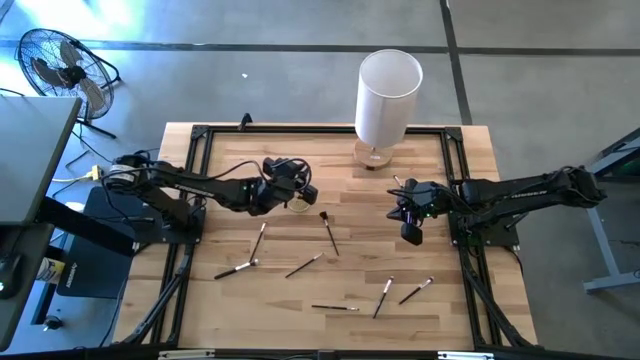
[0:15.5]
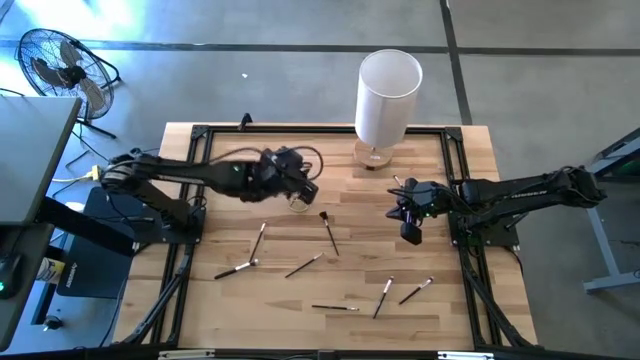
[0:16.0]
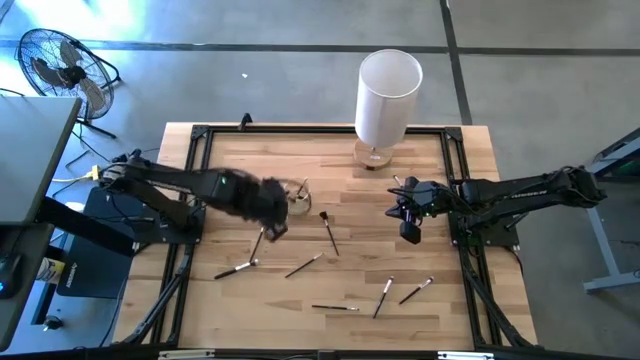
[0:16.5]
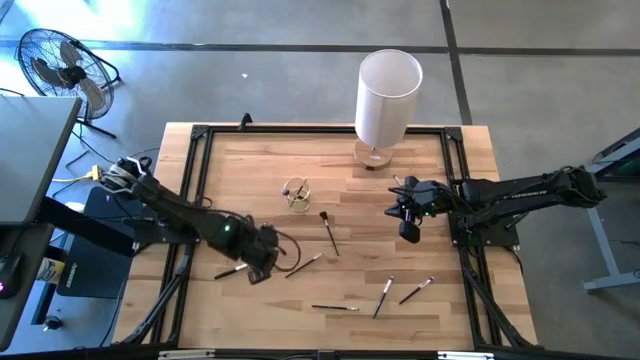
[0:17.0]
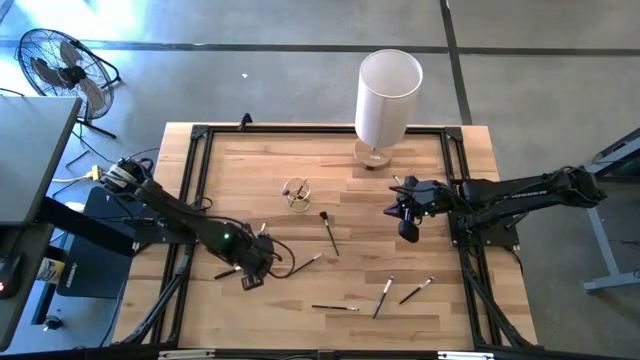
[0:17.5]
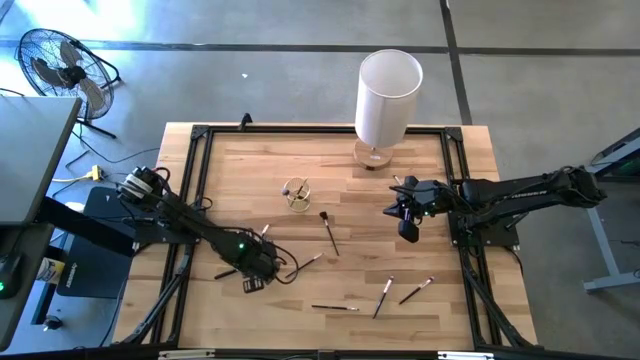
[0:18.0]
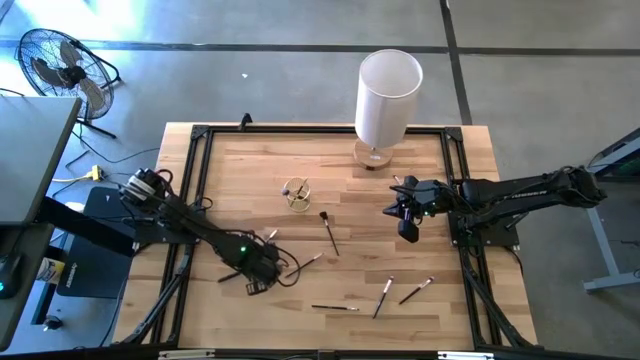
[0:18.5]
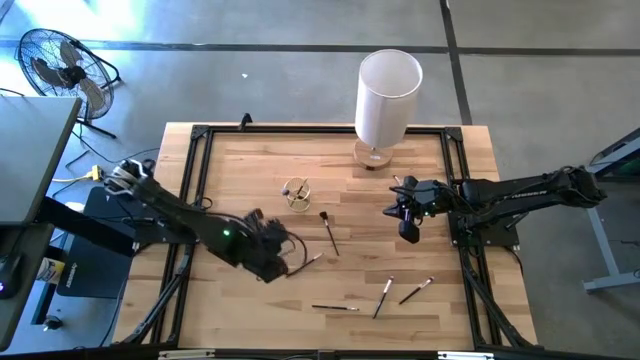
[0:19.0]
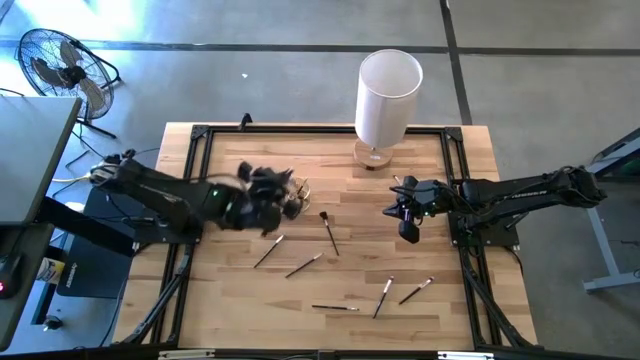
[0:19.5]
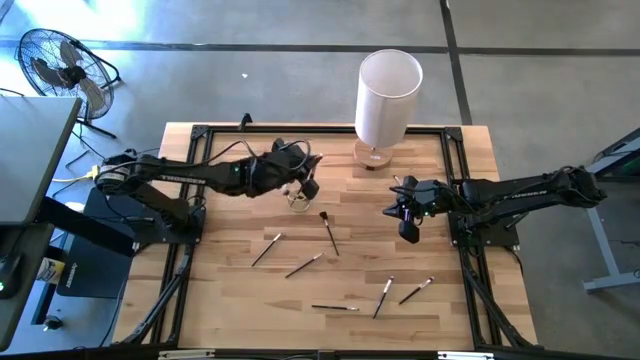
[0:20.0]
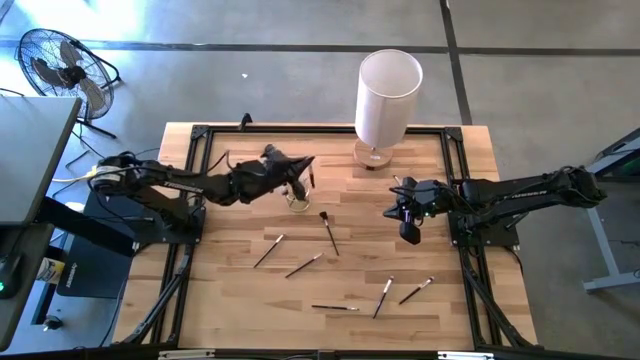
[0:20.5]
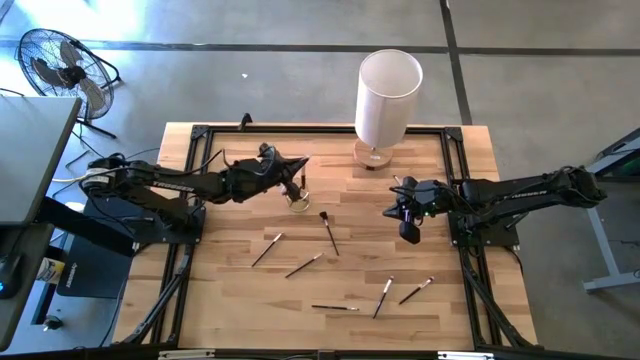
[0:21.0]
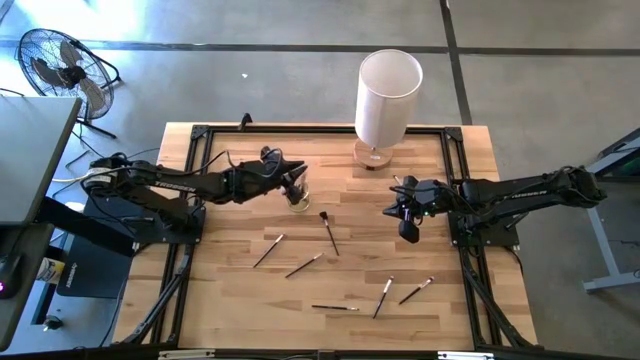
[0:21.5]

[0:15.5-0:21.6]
Task: Put items in baskets/containers
Put the black powder brush into the yellow holder

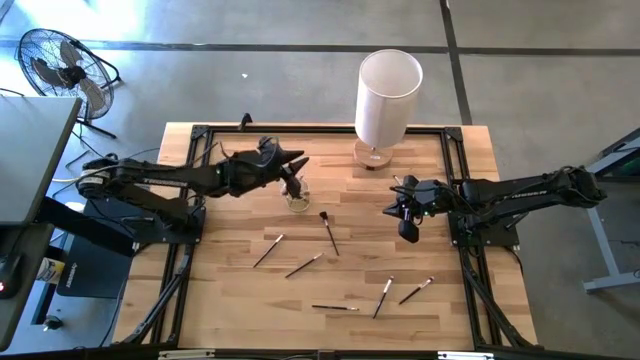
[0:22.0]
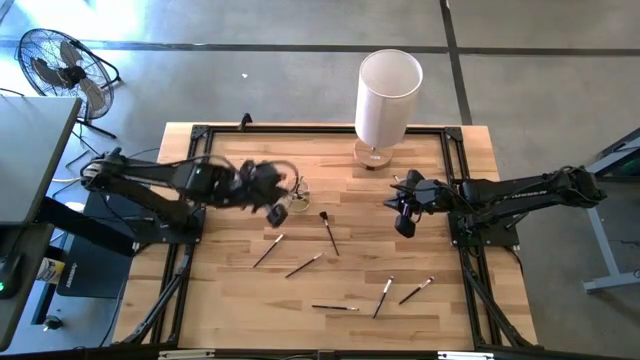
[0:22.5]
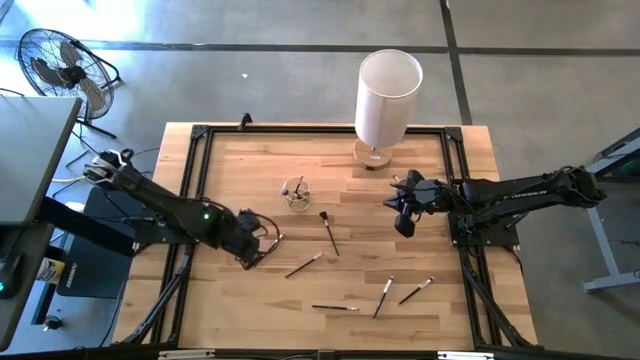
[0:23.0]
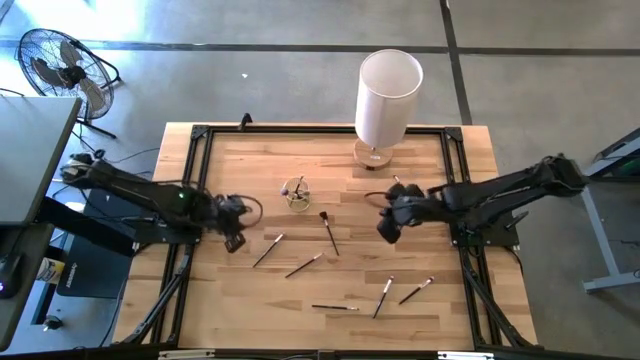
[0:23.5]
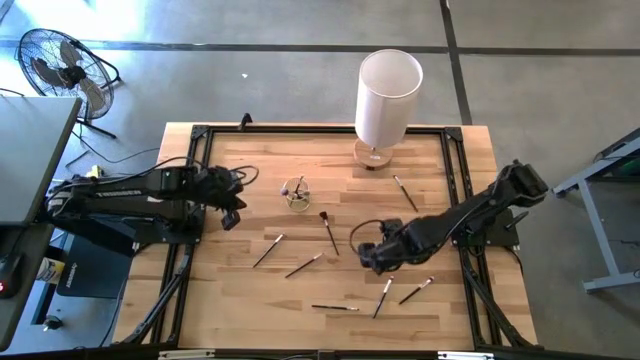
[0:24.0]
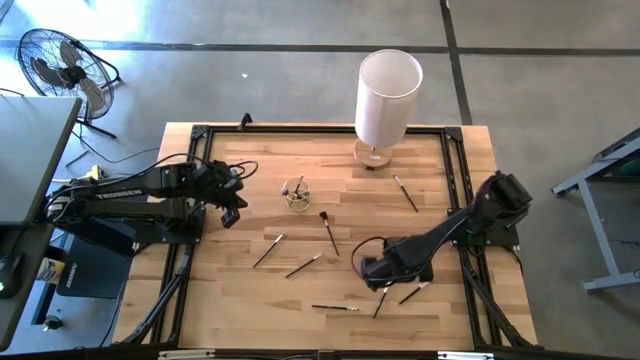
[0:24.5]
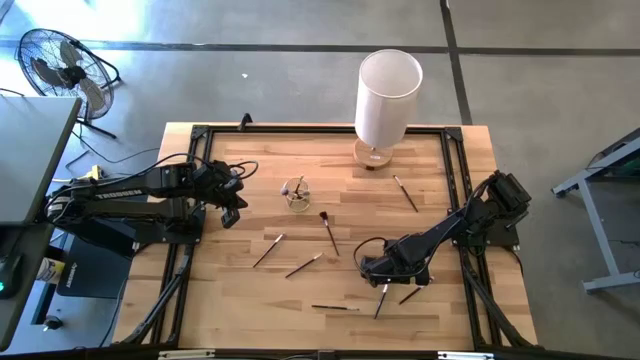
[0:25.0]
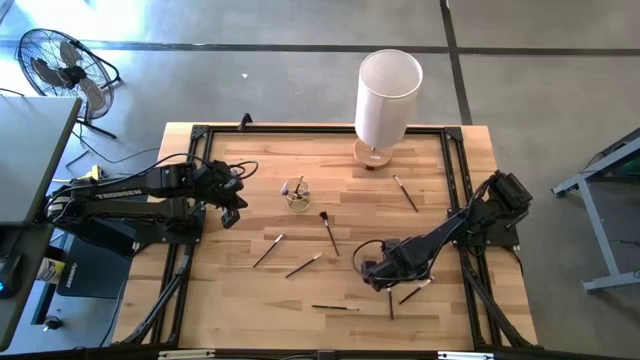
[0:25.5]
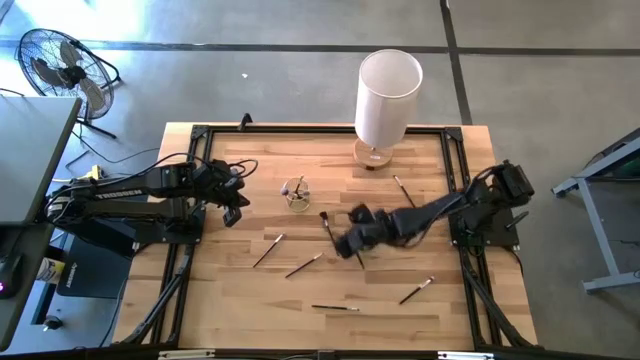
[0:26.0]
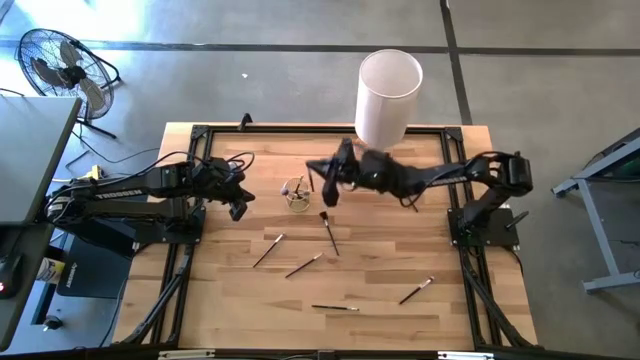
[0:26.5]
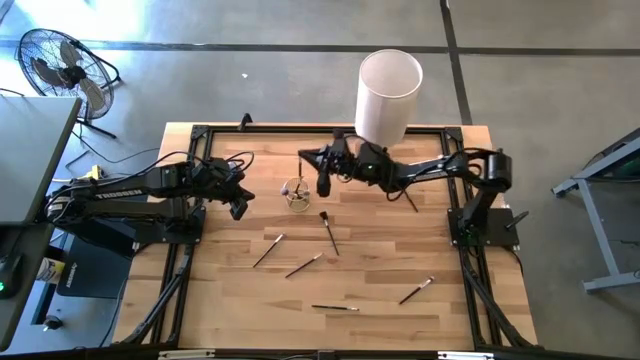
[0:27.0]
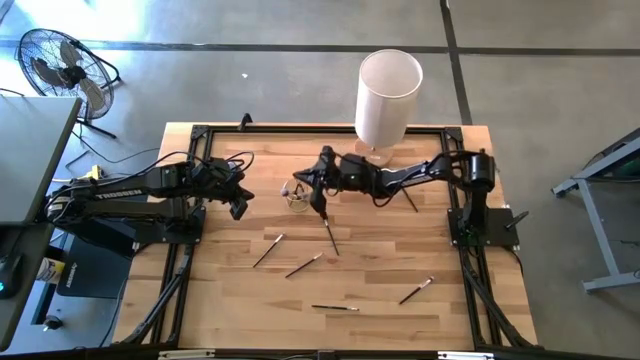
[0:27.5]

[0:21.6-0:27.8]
Put the black eyeshadow brush into the yellow holder

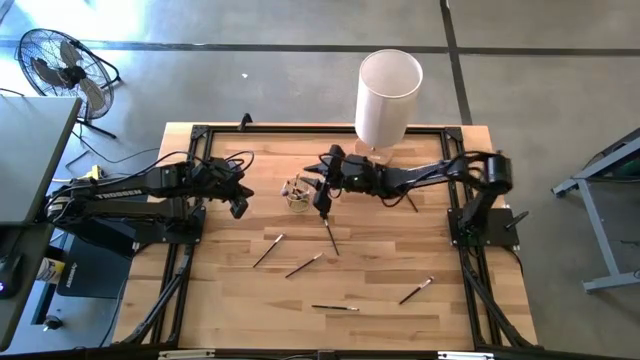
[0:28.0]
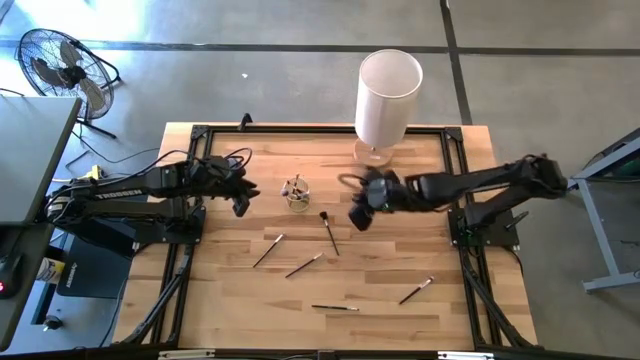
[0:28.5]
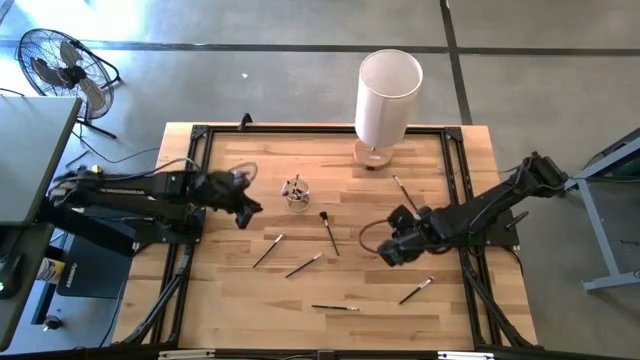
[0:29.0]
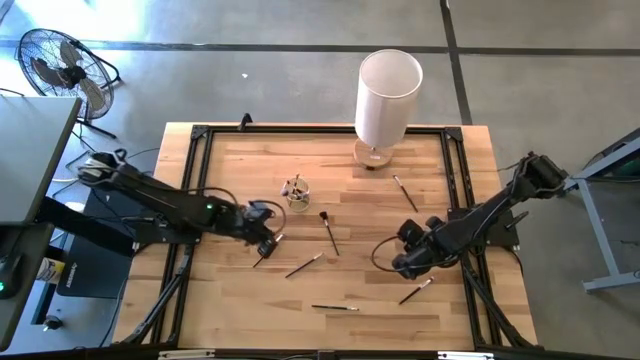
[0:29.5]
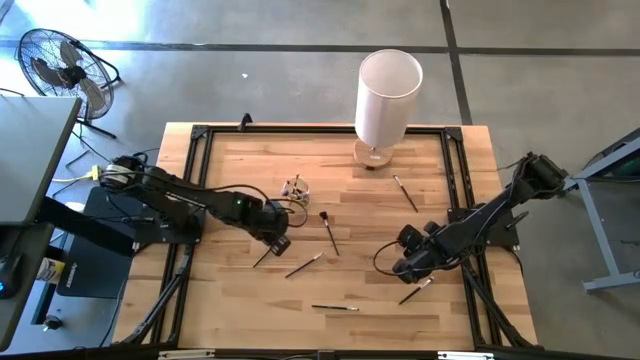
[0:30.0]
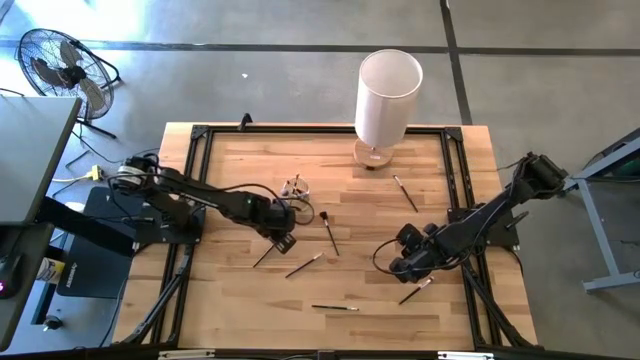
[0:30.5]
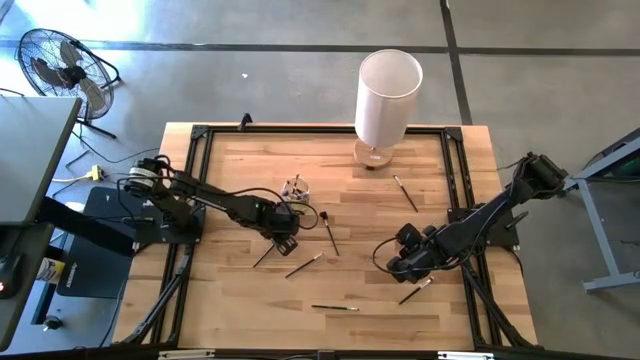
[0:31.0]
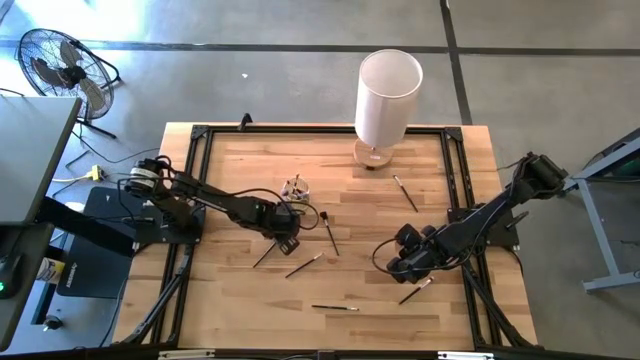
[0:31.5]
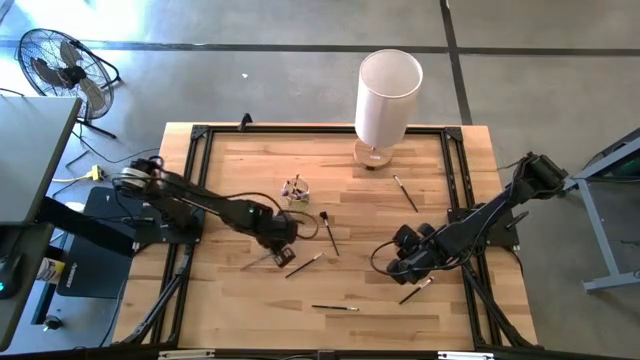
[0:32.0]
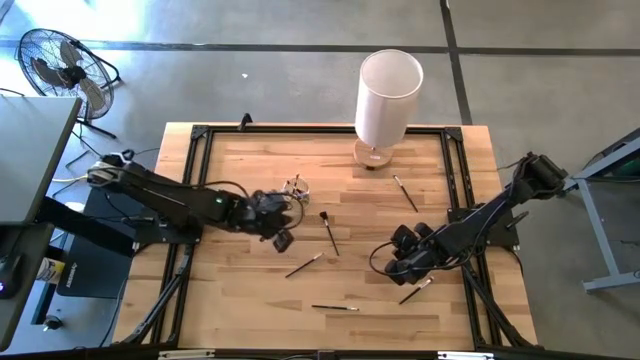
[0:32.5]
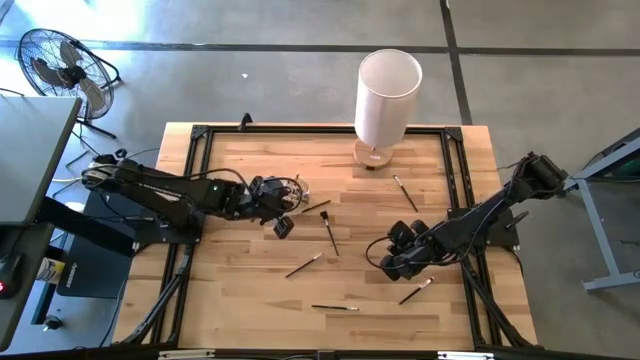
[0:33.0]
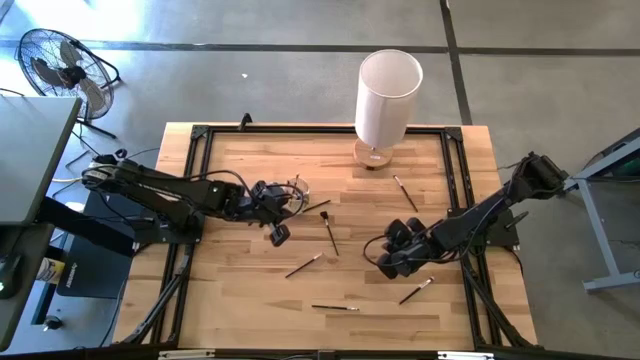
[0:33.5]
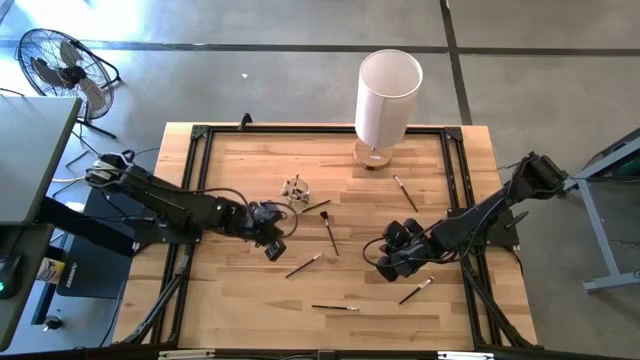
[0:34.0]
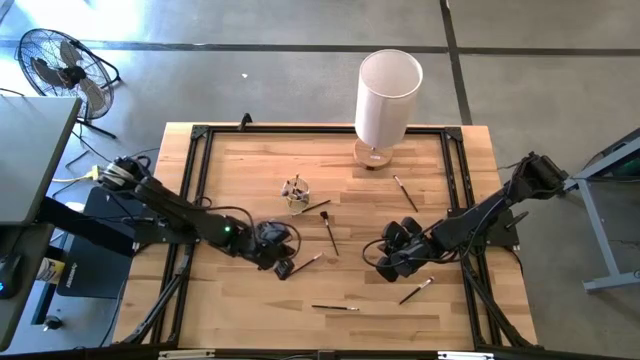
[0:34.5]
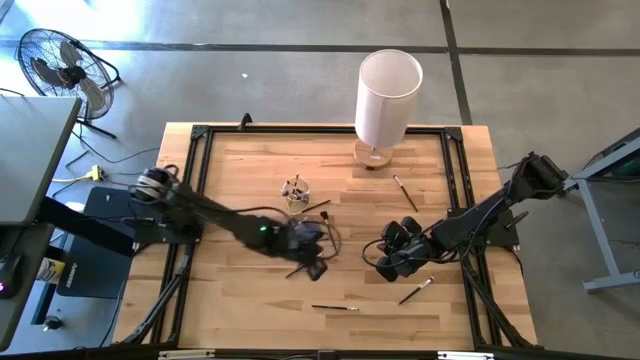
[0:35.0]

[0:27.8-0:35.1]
Put the black eyeshadow brush into the yellow holder

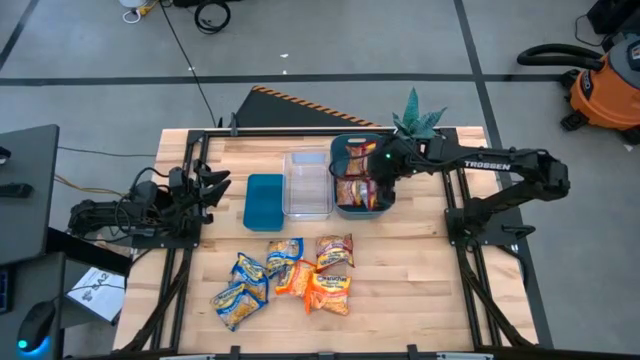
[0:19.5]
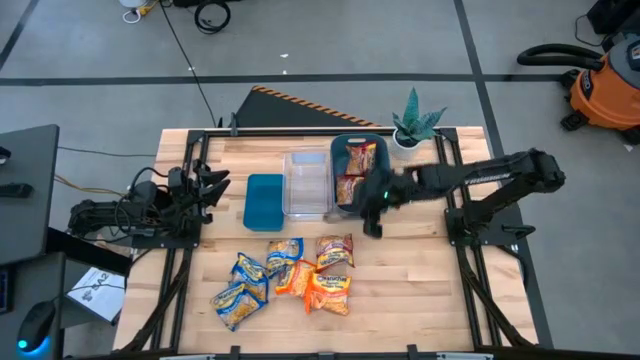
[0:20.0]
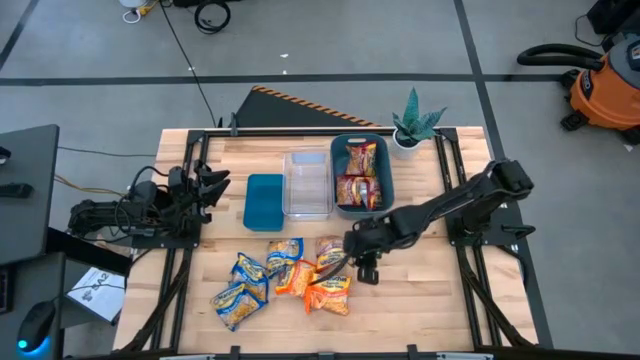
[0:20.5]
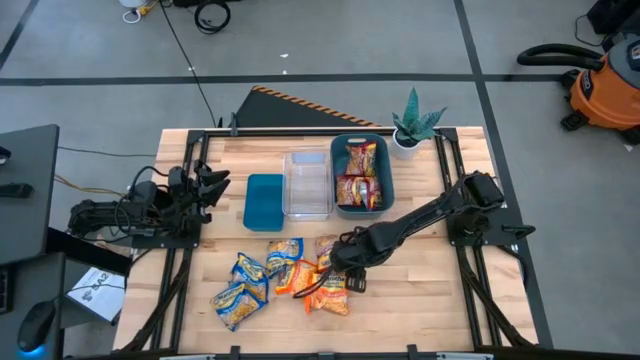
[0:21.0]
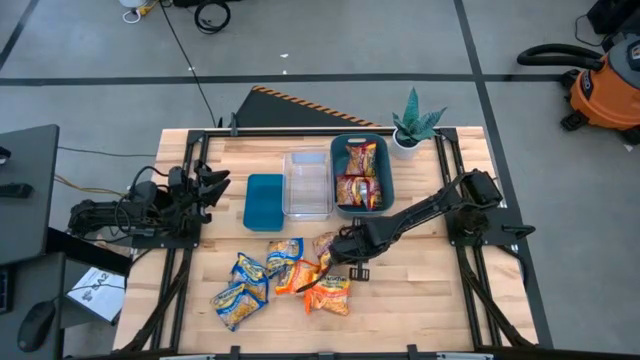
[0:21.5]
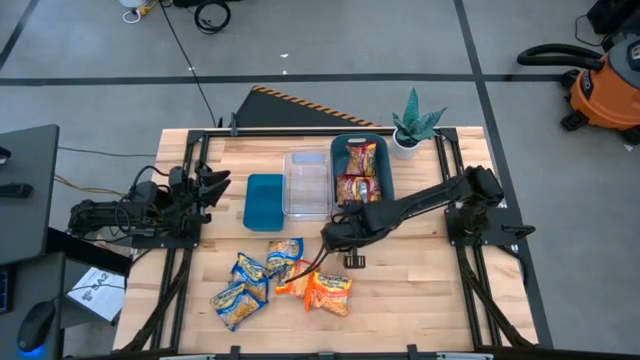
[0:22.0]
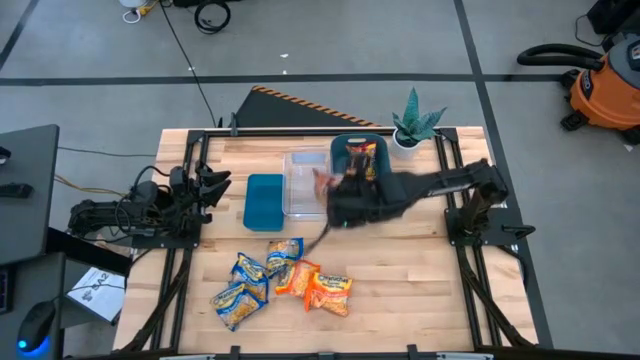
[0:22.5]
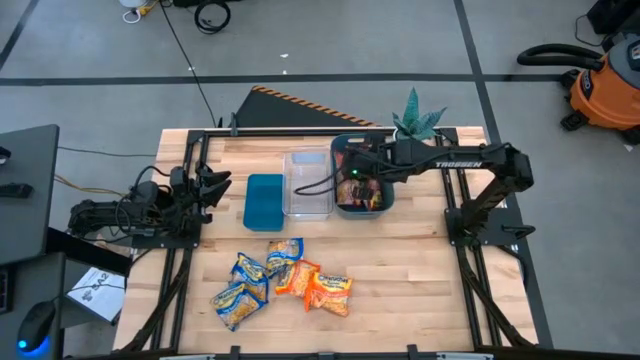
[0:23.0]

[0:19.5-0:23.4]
Task: Sort Maruchan noodles
Put the red noodle pack into the green bin
